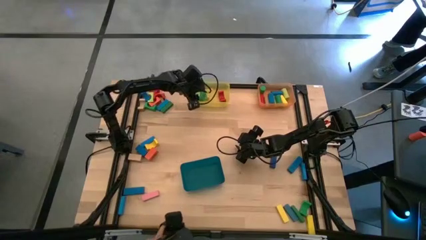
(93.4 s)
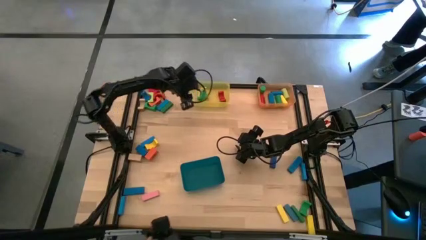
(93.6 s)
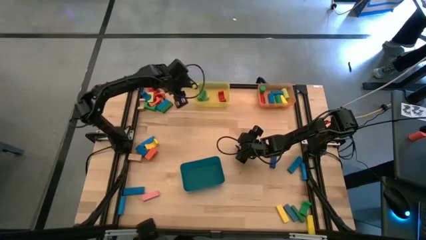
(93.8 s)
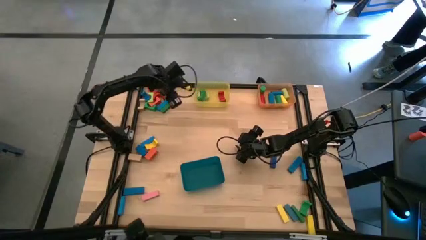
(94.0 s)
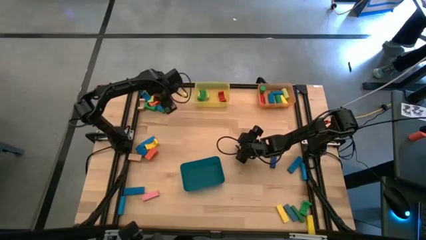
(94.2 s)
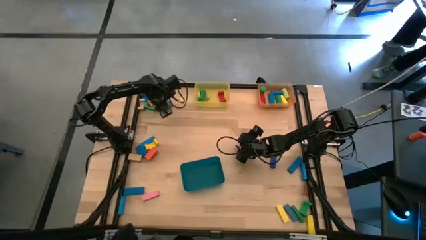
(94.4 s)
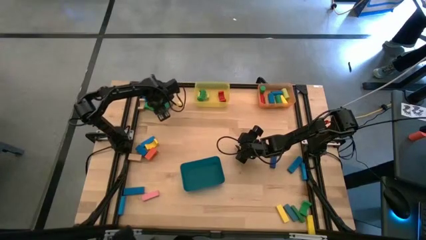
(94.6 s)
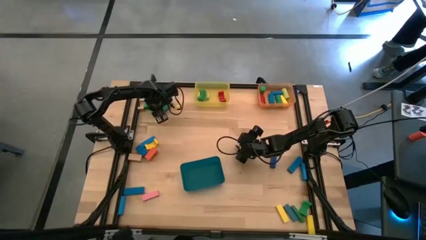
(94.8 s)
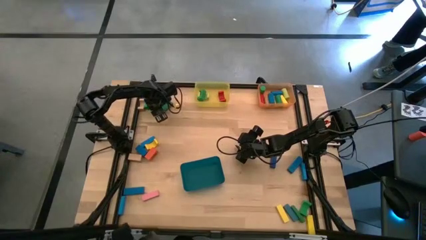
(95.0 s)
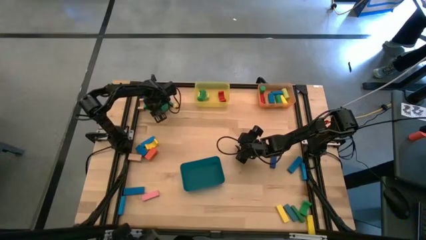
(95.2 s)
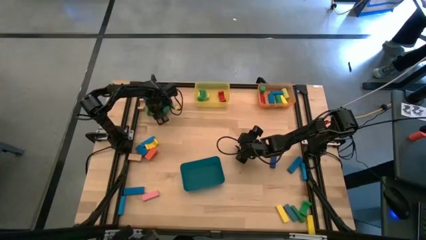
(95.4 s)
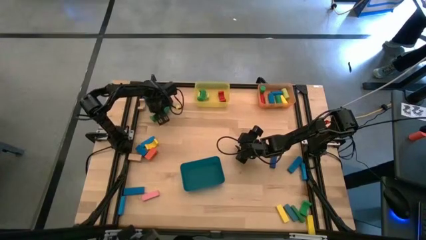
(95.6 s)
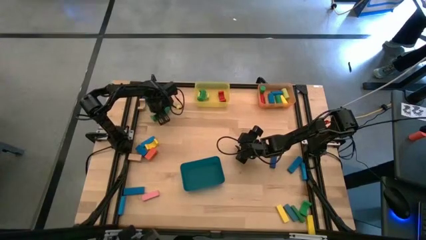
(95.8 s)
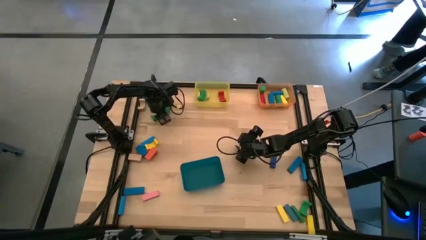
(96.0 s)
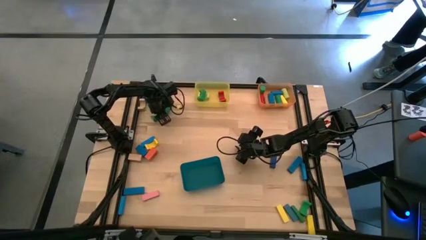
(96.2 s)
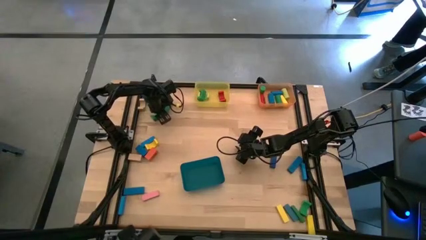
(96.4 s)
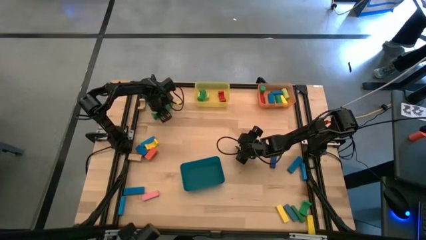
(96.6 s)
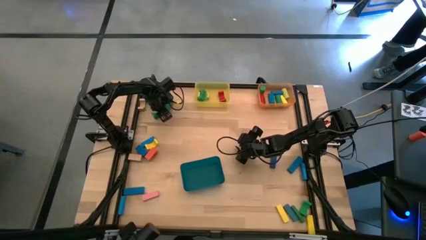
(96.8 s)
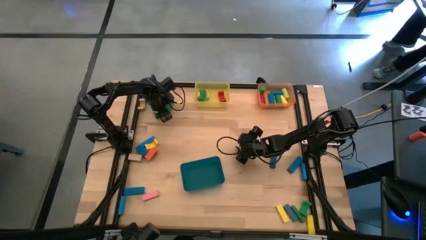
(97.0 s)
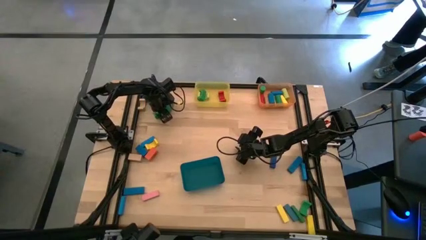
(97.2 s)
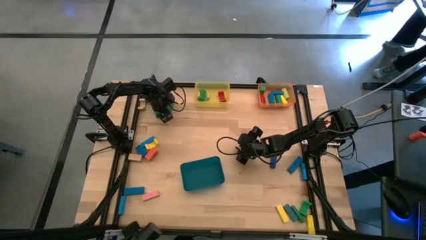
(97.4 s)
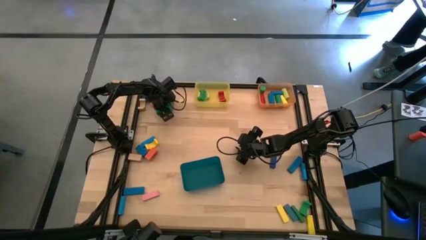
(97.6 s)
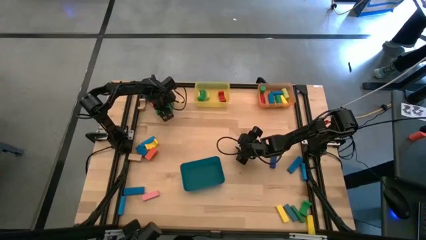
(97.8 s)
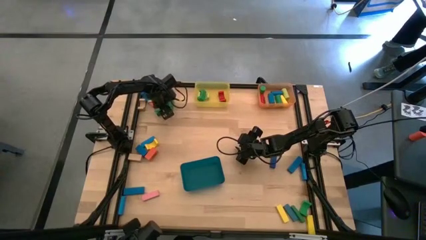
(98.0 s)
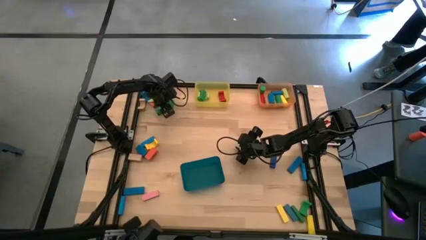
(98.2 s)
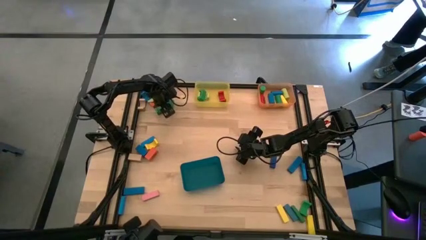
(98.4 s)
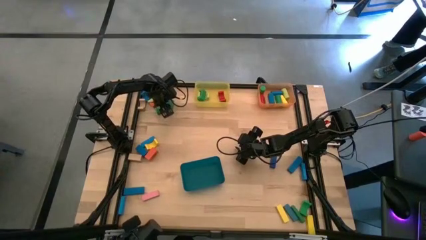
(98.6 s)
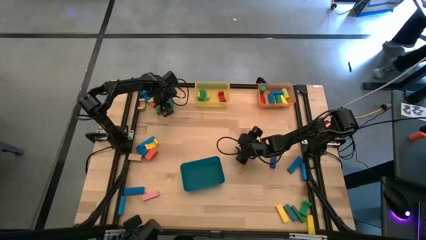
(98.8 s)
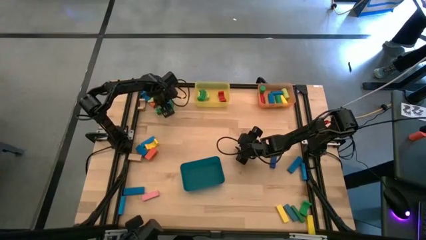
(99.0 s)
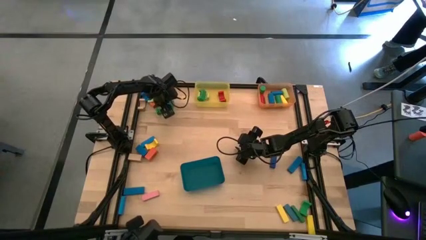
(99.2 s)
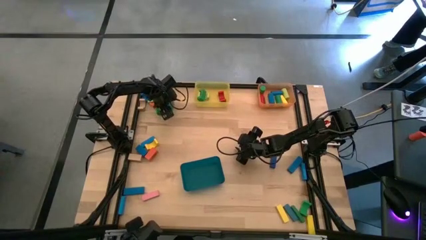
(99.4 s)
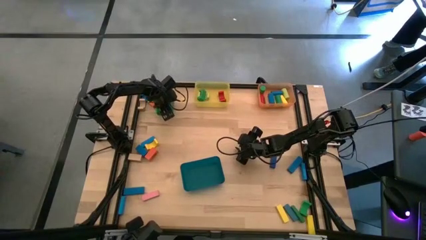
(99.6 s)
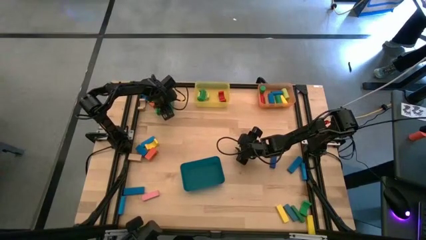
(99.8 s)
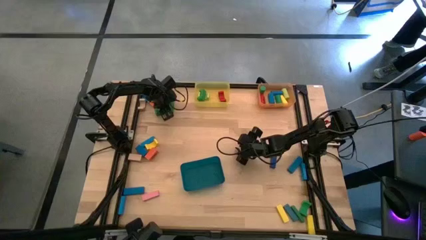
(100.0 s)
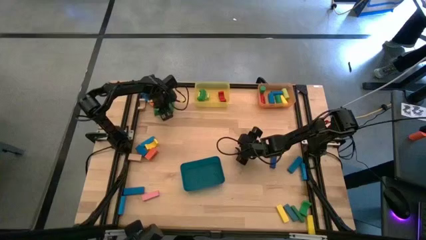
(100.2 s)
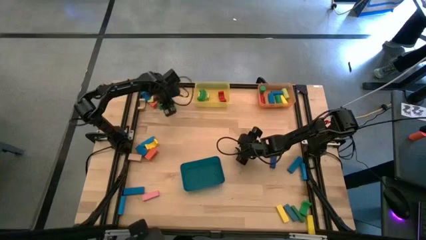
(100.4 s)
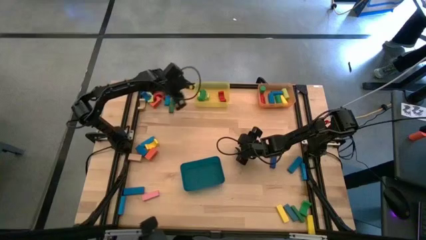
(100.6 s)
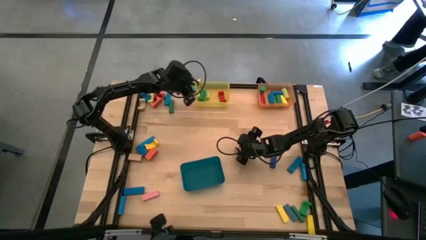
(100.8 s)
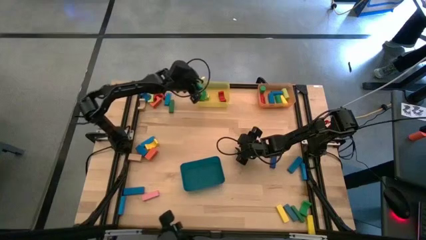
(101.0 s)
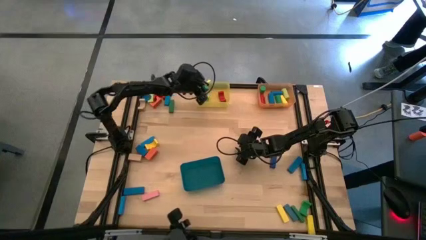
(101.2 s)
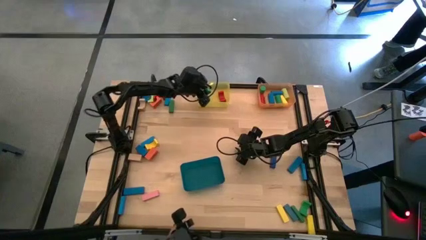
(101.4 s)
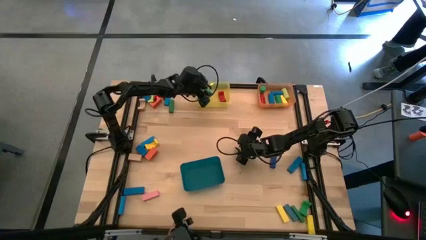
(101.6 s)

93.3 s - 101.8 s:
Task: Sort blocks by size
Put the green arch block into the yellow bin

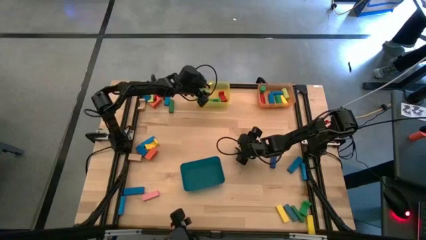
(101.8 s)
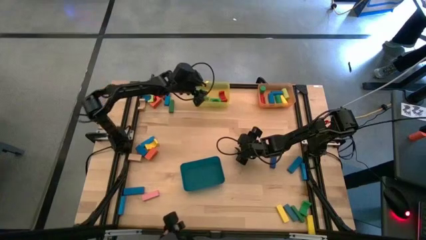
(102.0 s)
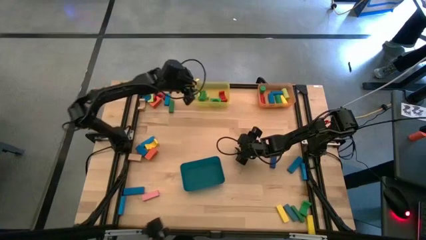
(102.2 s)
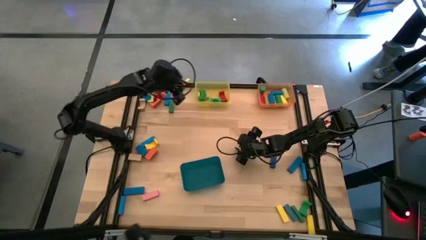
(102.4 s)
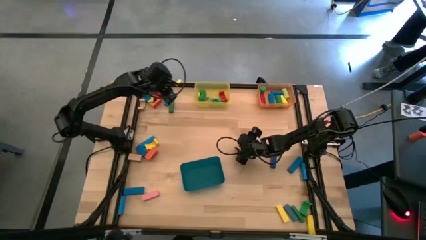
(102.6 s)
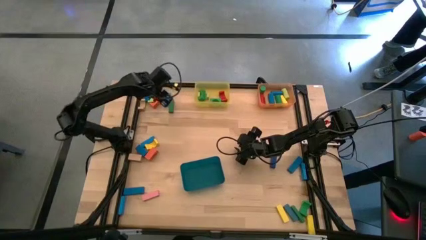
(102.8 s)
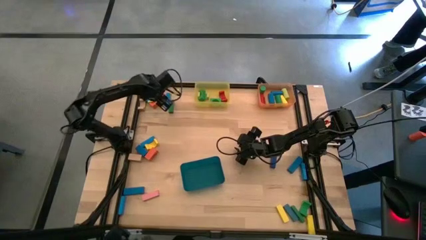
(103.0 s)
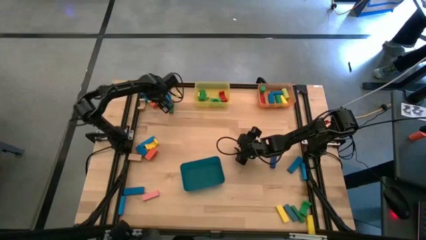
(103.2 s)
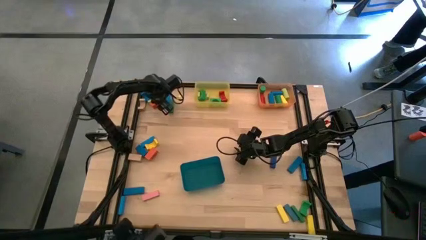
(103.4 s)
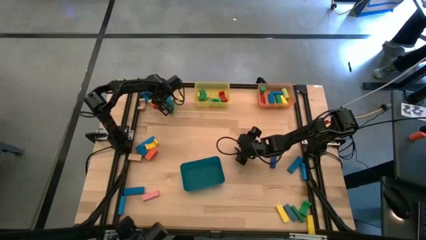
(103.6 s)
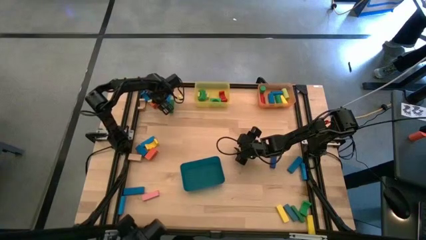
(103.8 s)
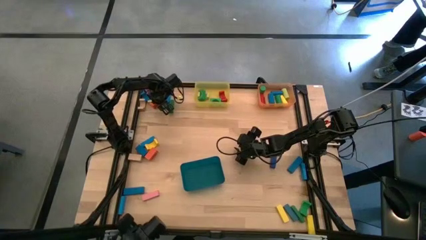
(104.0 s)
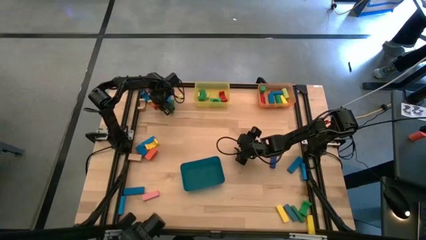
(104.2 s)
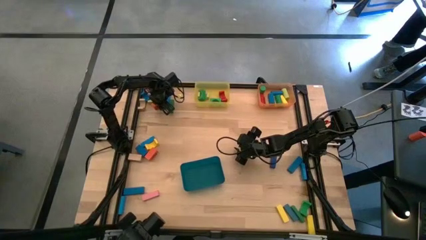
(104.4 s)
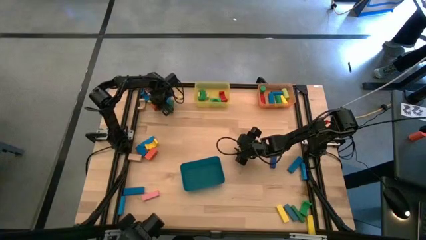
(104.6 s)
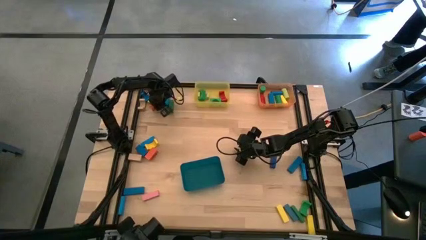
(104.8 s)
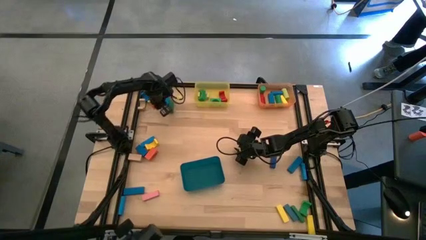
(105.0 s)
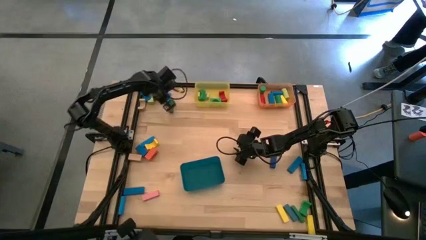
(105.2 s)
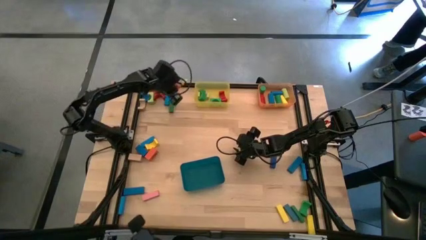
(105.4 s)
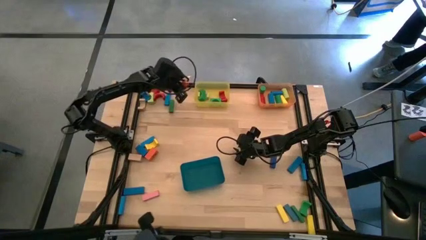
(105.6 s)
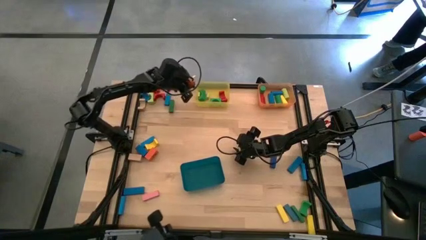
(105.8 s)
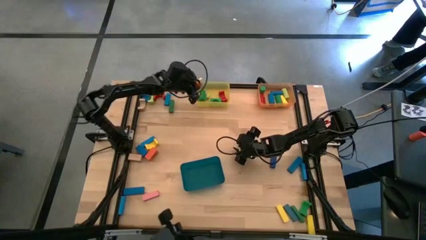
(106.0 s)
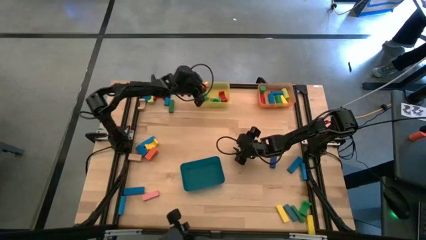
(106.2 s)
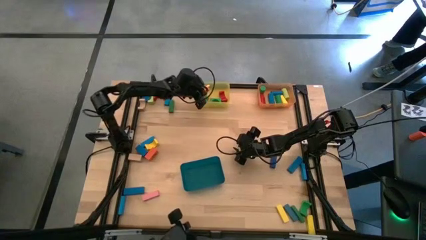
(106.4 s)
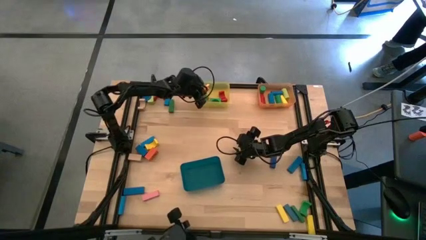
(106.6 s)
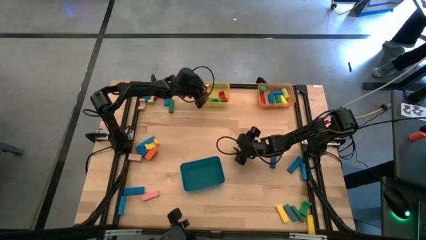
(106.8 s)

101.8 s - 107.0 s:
Put the orange arch block into the yellow bin

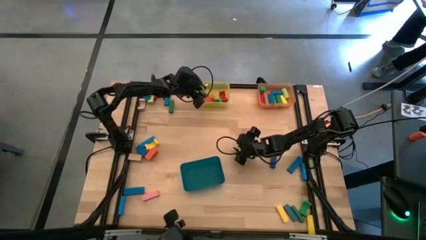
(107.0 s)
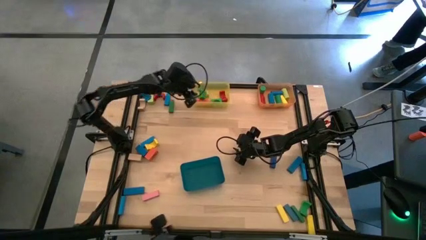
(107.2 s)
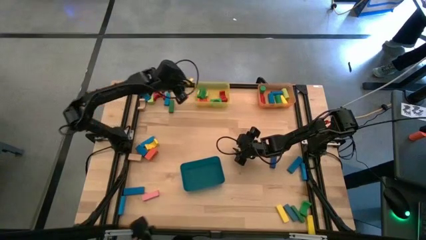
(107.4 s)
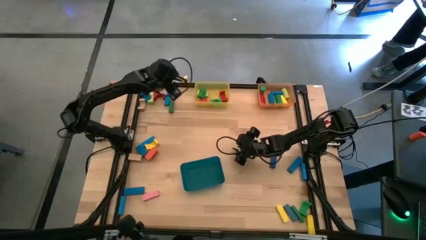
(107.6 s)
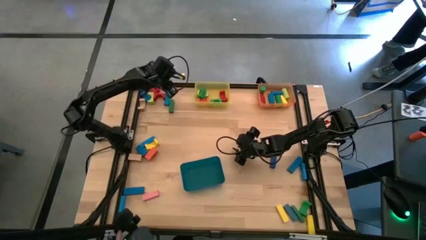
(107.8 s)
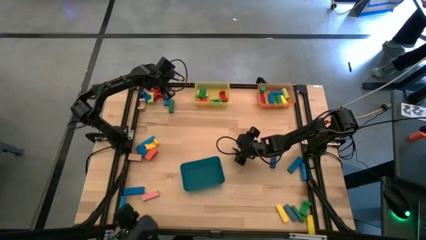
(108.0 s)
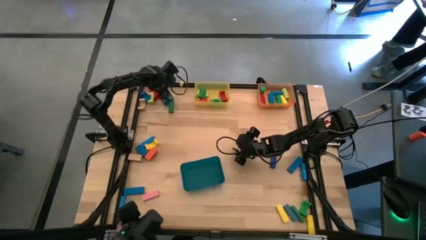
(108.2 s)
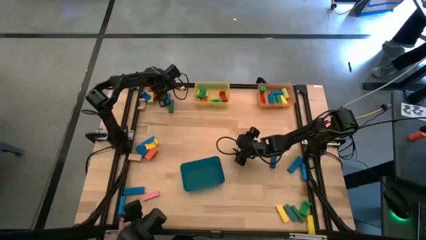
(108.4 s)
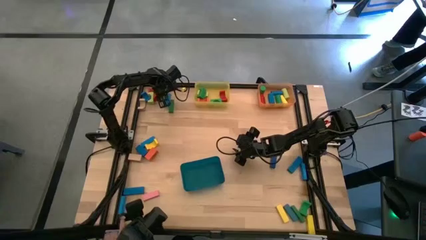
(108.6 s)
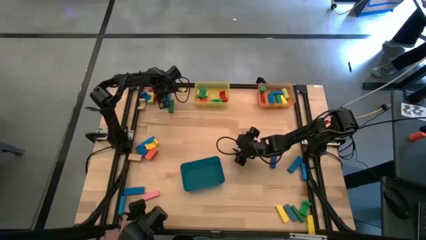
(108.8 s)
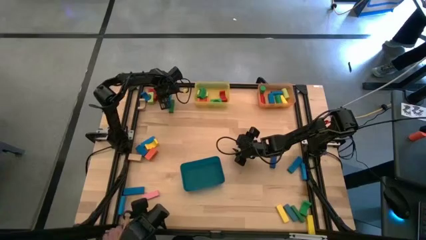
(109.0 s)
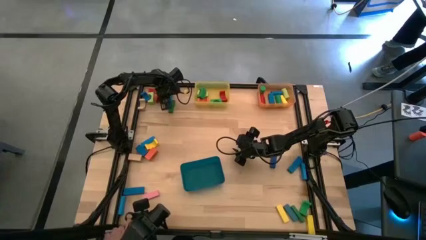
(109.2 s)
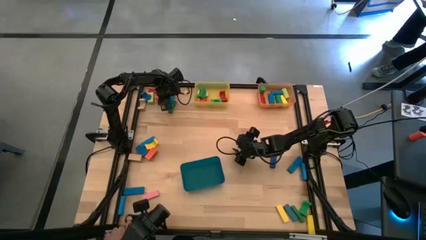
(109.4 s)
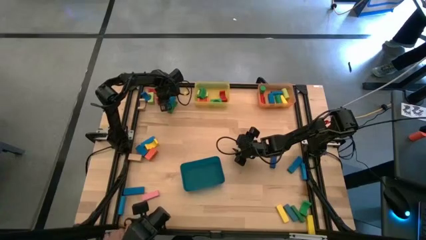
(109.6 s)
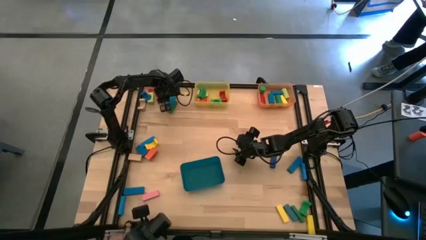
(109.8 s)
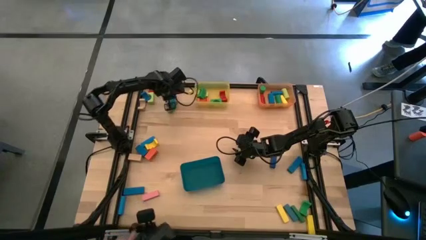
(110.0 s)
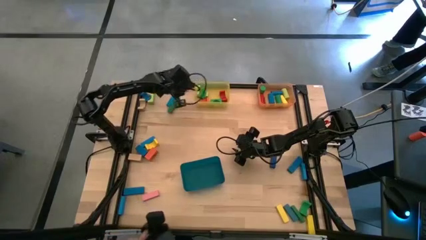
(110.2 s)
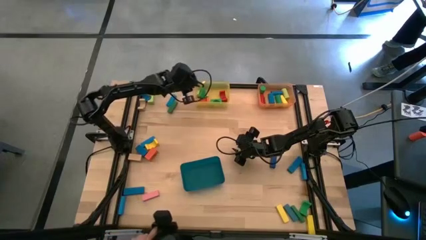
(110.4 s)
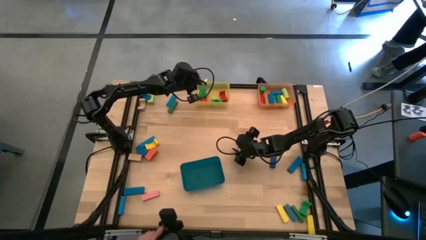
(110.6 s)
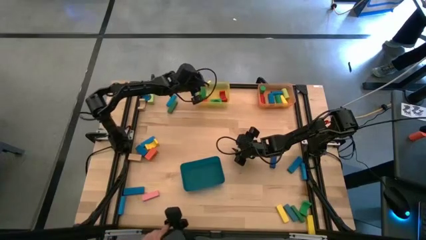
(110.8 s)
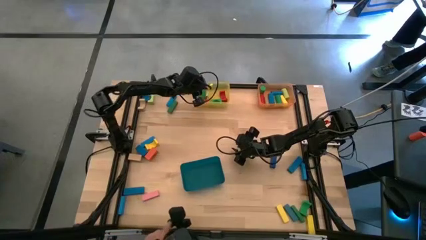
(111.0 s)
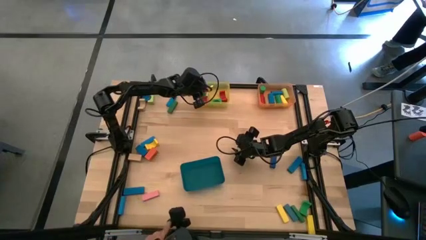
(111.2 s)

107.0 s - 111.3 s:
Put the red arch block into the yellow bin
